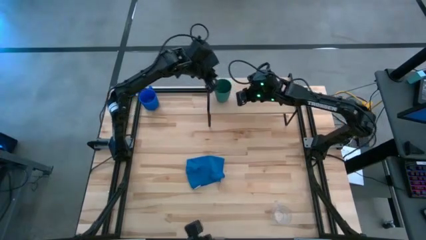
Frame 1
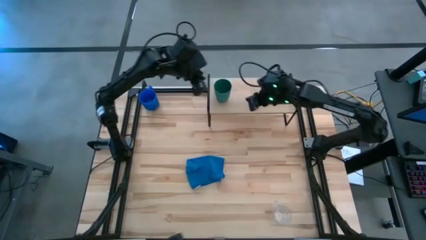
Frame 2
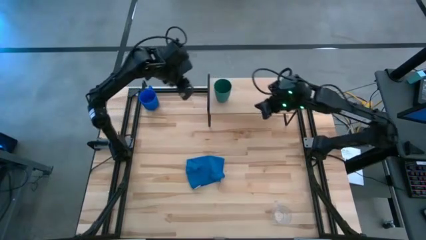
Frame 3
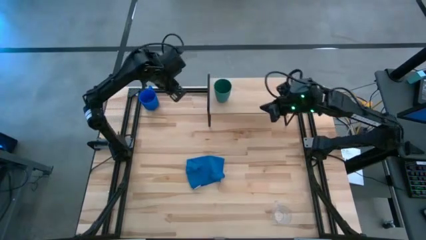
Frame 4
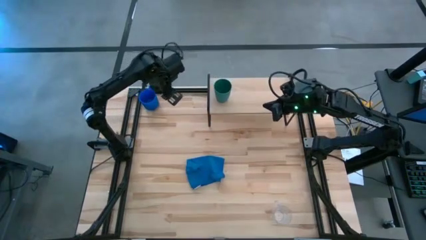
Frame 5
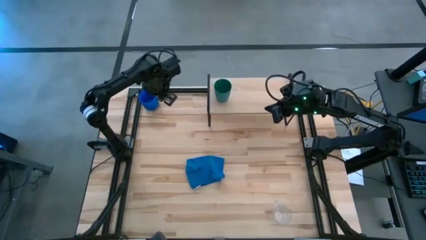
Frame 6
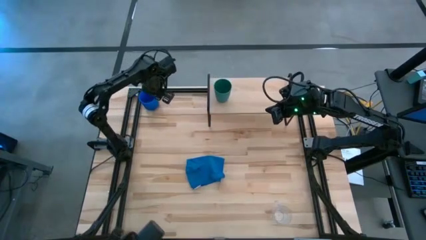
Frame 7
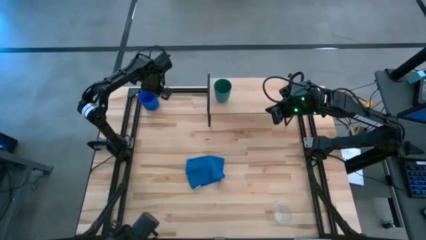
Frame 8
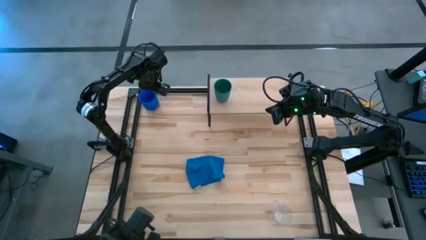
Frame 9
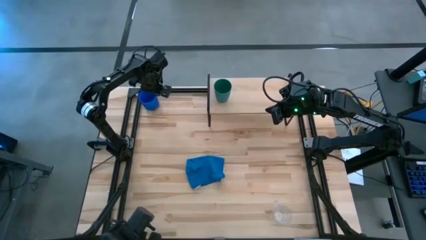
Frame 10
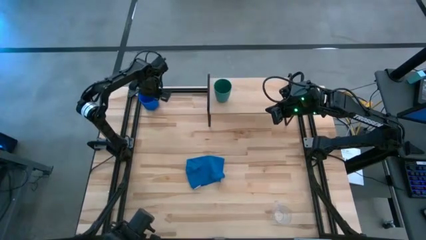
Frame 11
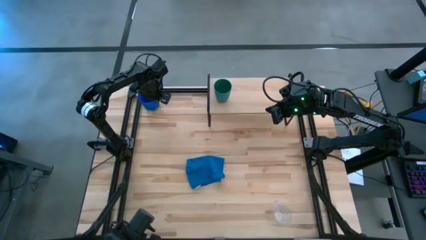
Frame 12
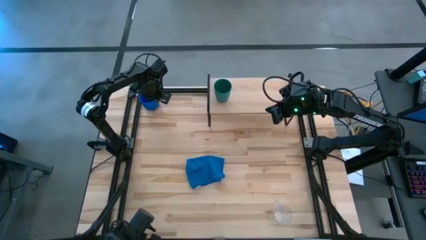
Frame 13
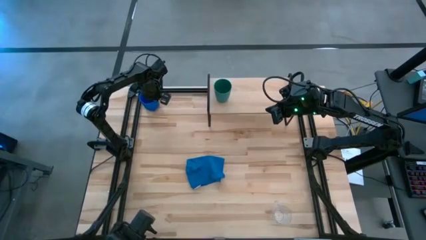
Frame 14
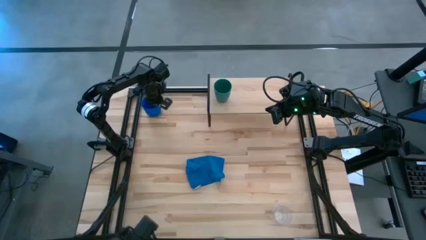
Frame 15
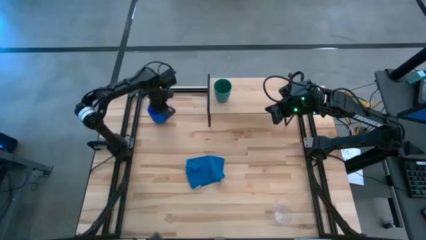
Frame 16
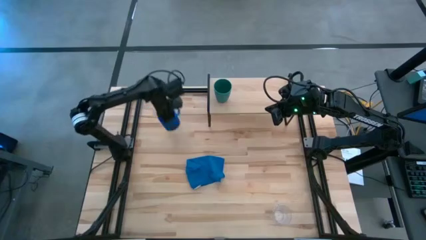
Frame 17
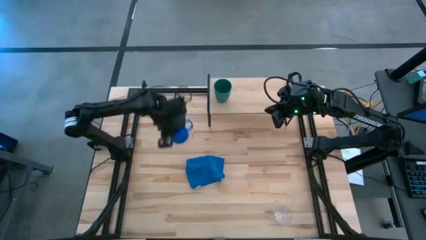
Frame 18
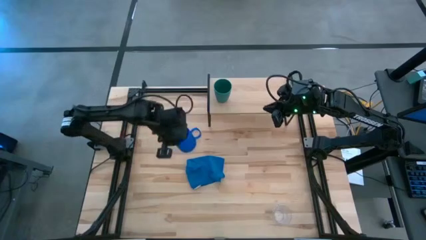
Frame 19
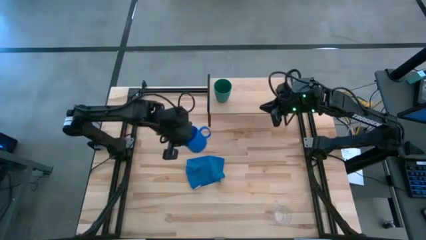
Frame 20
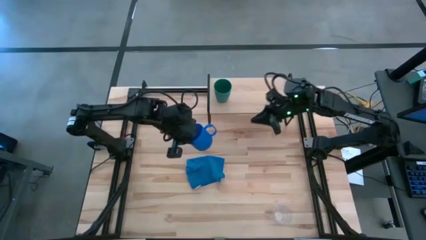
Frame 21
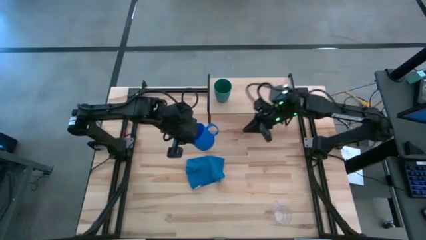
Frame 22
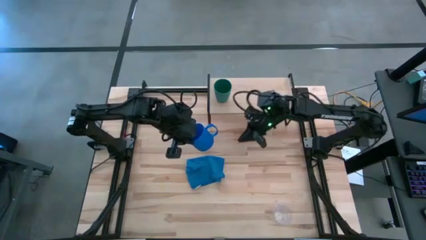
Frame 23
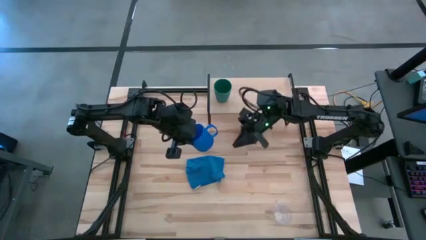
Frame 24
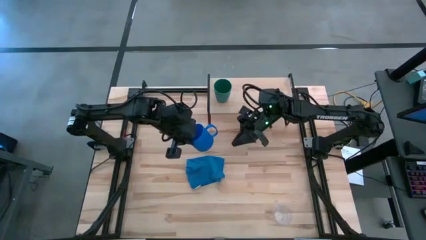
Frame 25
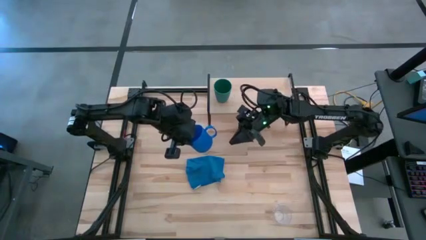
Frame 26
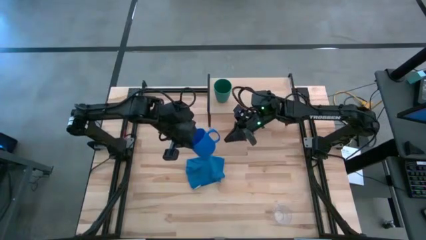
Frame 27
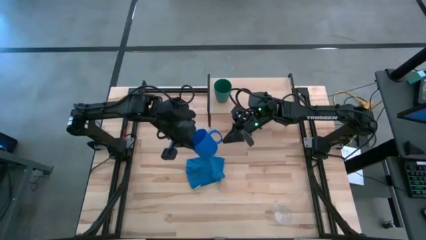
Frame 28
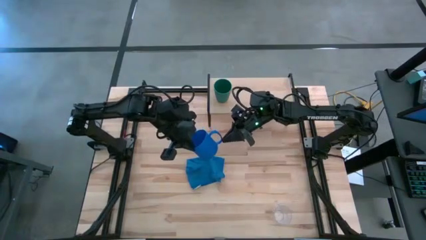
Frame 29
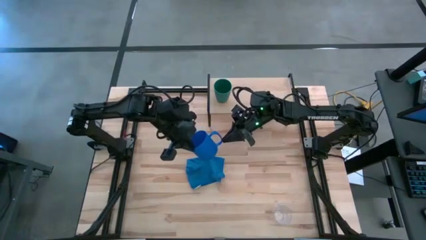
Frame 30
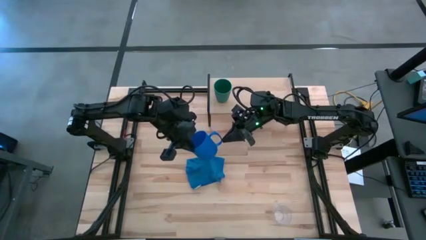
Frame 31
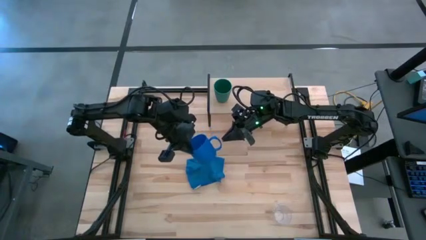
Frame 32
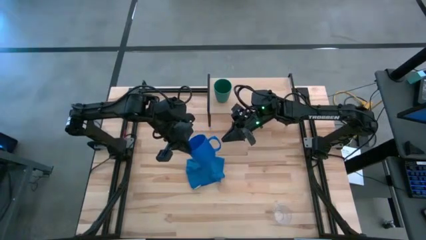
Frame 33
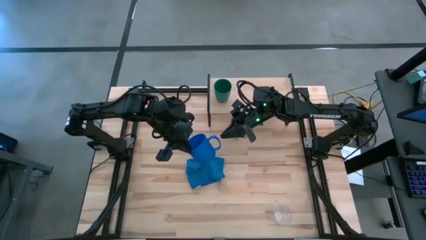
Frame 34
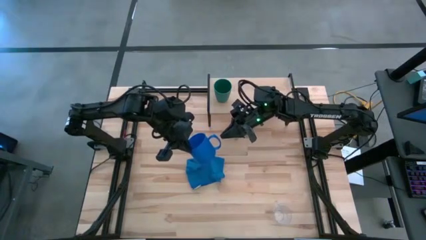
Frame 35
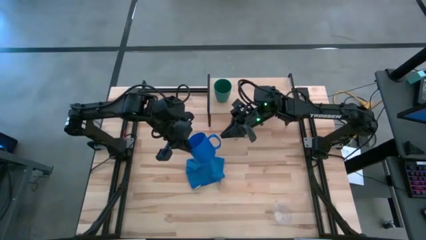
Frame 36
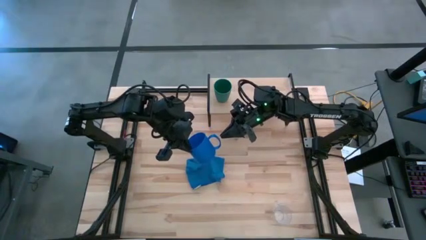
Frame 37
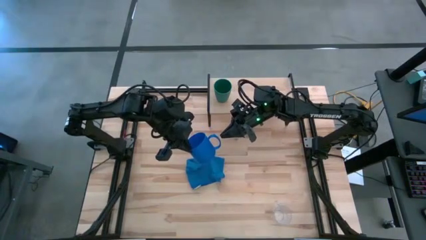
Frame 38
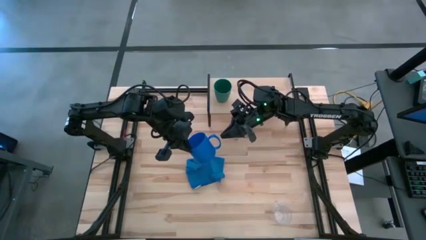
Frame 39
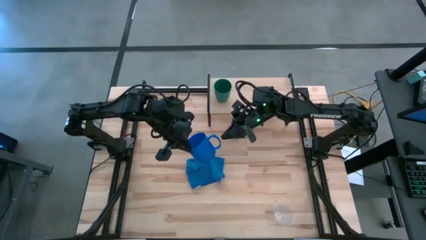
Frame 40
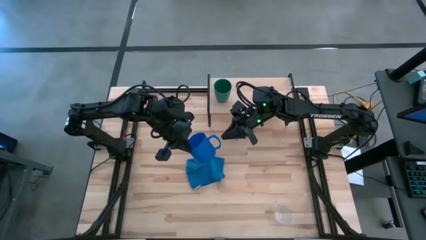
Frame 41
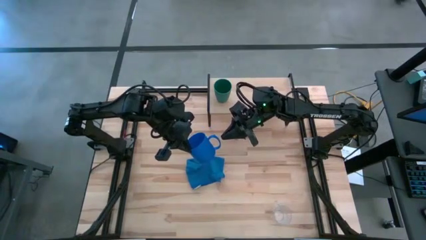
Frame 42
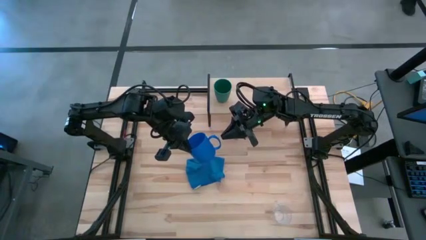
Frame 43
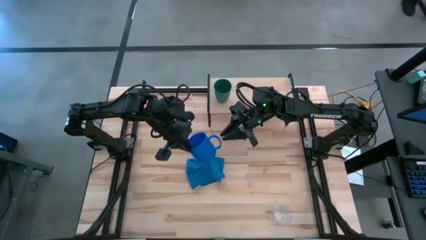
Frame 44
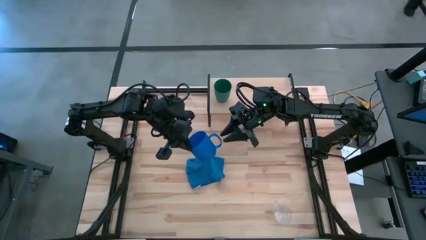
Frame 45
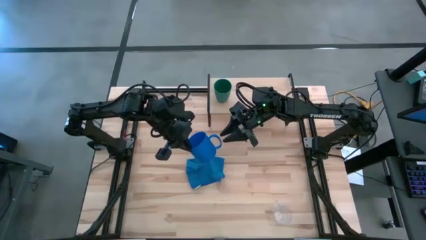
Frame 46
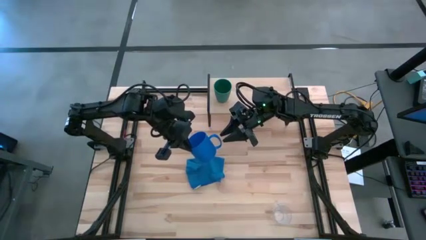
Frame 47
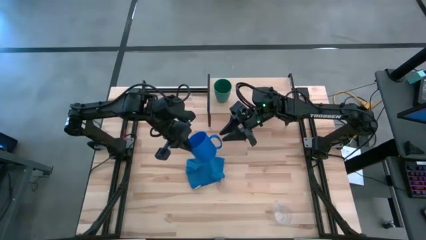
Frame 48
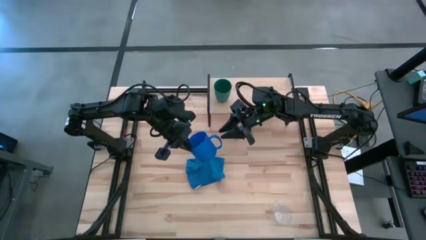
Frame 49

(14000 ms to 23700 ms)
Task: Stack small to large cups/mugs on shelf
Put the blue mug on the shelf

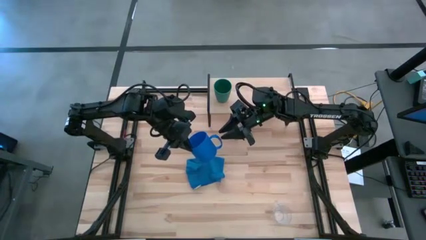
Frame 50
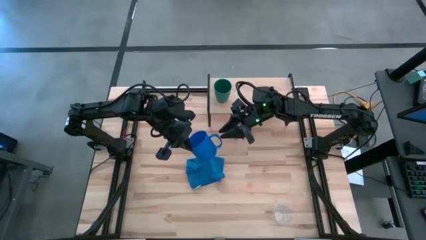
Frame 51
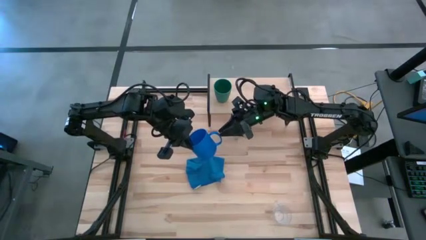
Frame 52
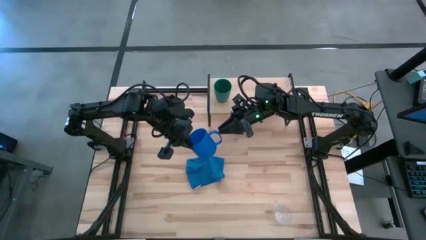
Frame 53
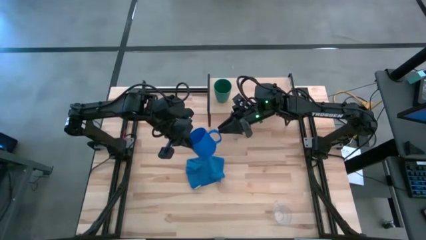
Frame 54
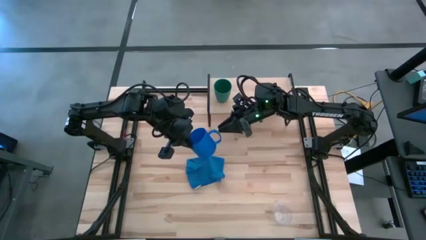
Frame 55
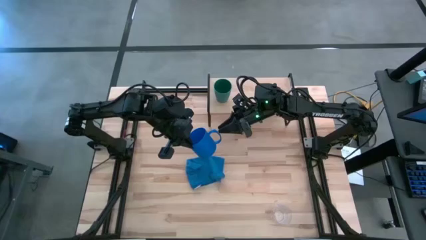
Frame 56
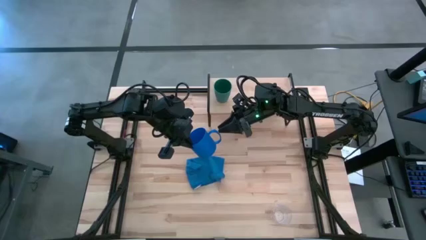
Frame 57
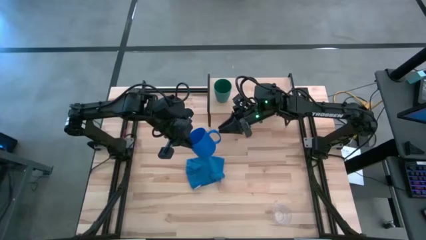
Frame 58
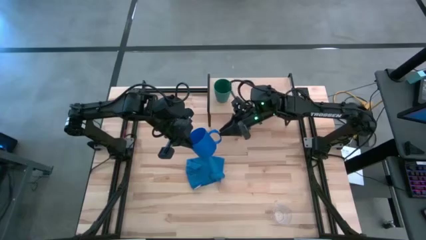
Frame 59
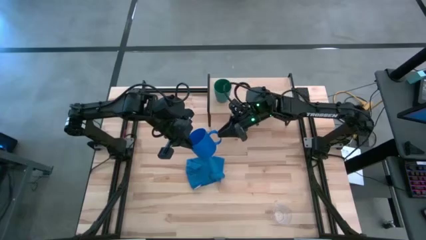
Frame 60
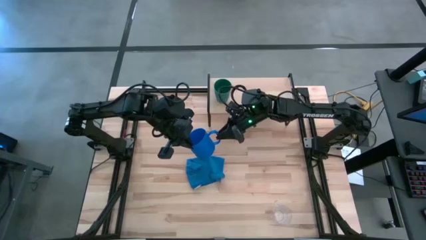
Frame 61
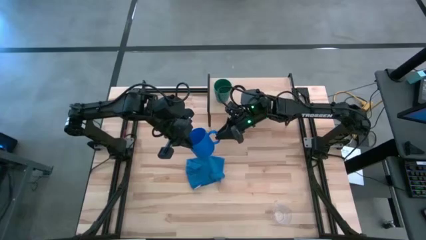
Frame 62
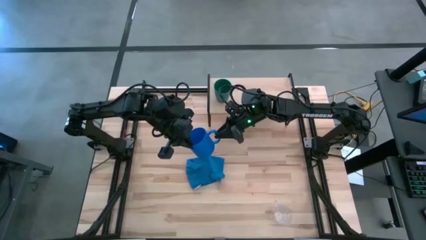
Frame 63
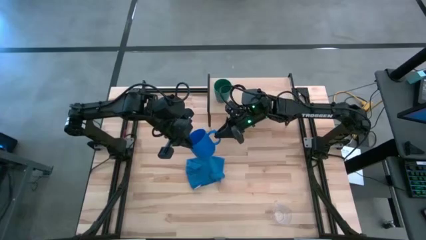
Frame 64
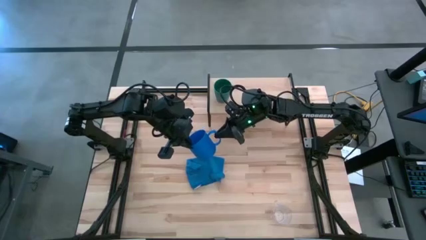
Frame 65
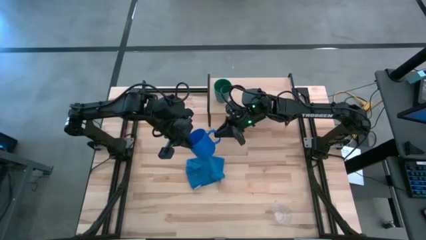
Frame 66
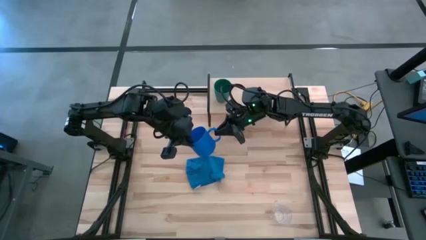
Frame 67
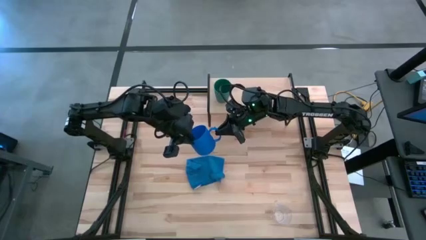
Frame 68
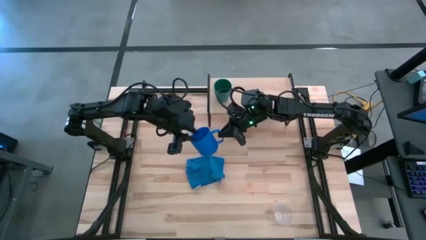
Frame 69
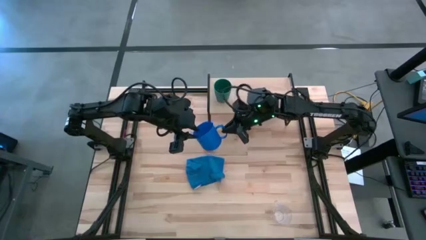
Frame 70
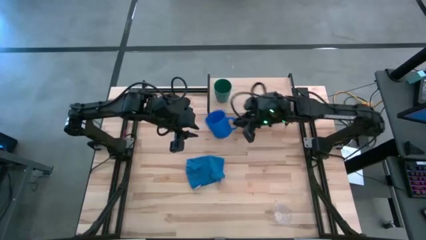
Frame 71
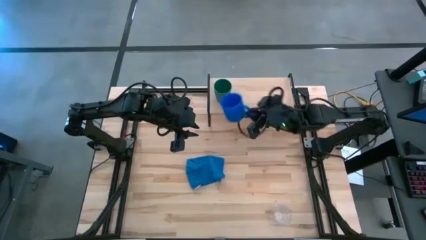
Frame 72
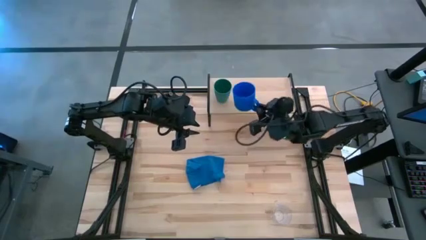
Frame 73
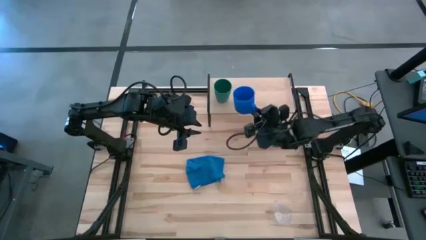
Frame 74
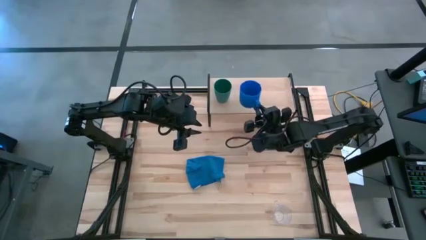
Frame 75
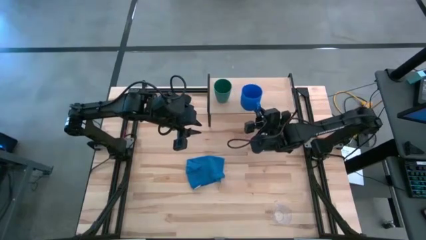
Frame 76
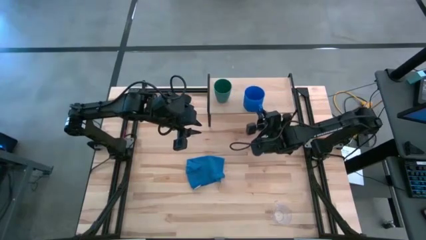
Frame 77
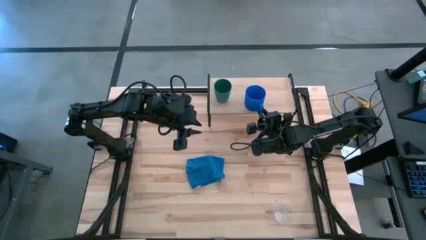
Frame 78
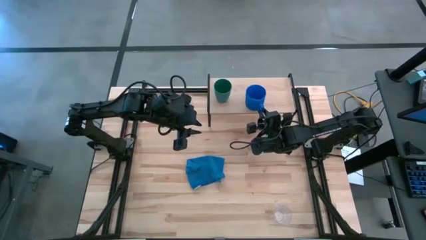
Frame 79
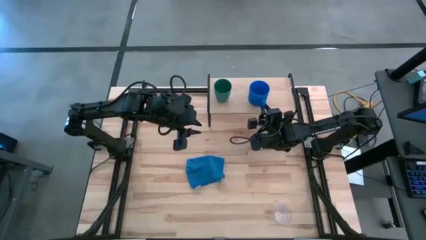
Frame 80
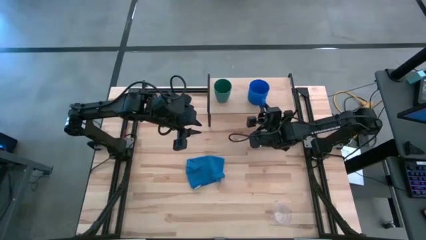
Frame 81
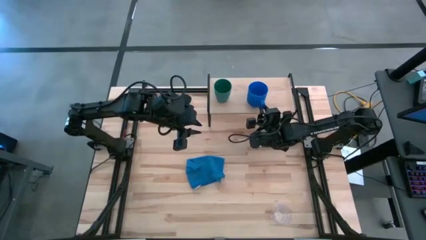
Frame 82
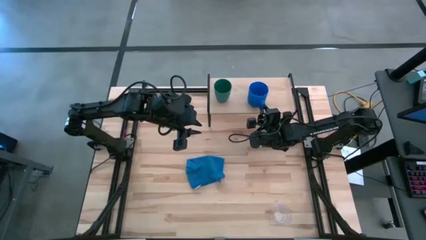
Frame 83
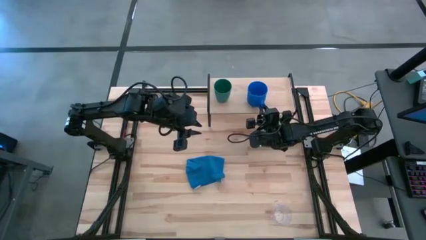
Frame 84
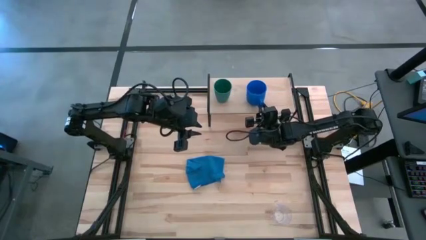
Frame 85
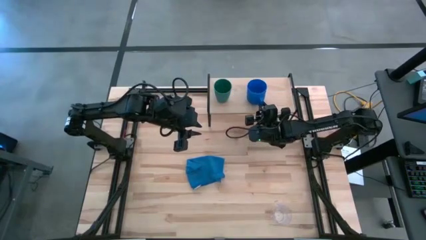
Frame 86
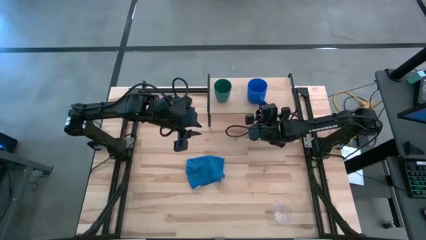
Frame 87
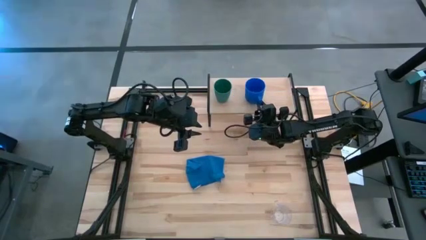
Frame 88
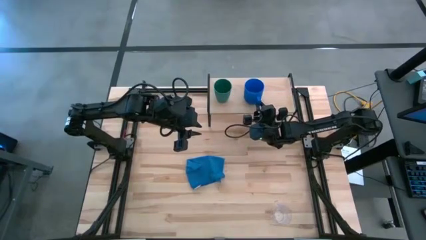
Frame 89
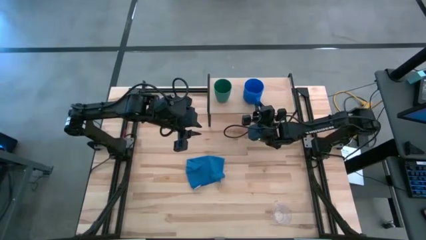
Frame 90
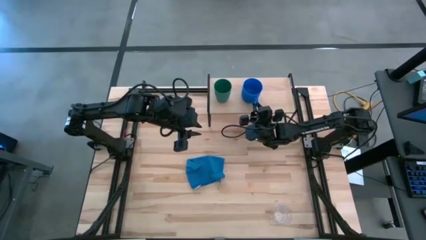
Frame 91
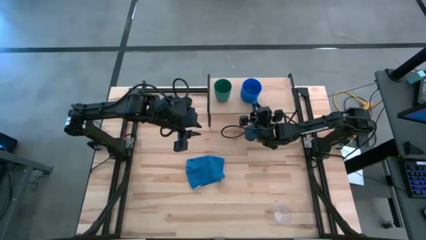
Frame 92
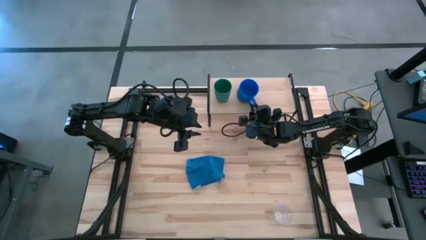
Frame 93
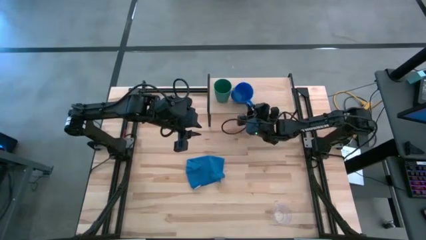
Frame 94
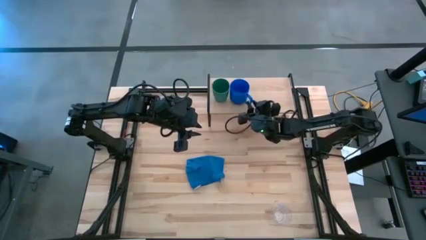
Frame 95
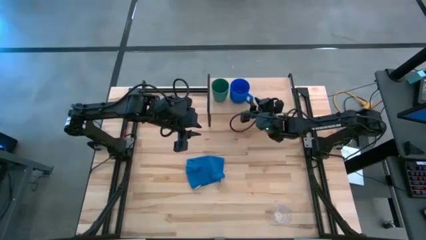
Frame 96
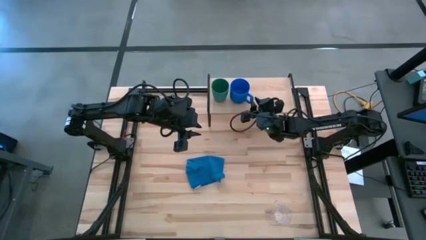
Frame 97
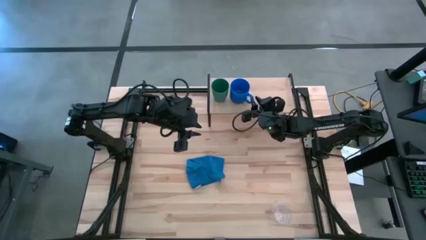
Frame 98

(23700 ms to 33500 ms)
Put the blue mug on the shelf
